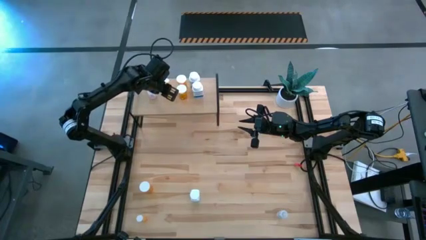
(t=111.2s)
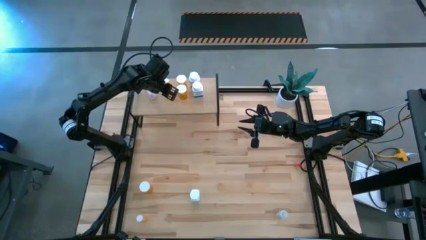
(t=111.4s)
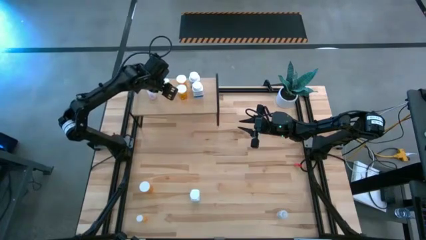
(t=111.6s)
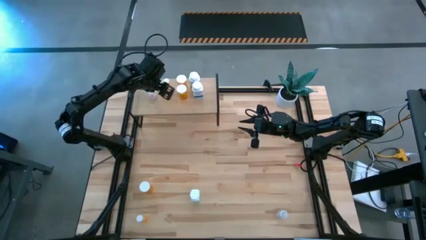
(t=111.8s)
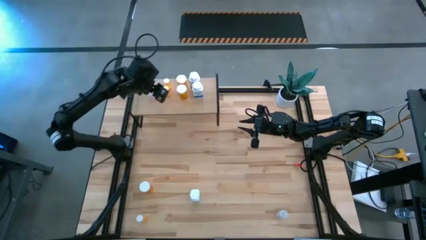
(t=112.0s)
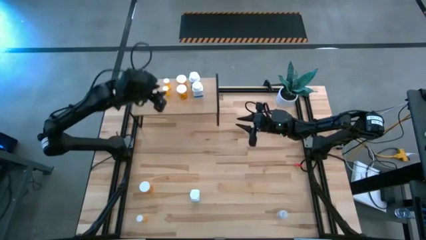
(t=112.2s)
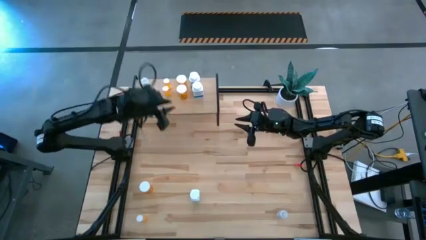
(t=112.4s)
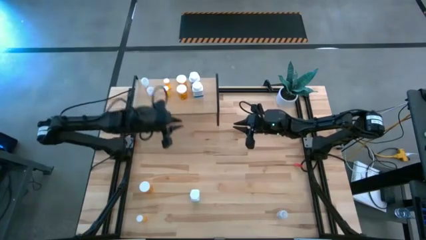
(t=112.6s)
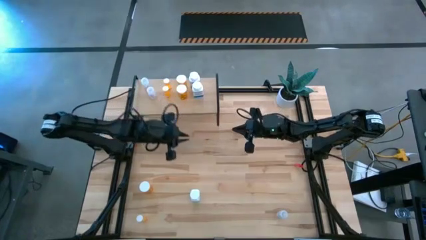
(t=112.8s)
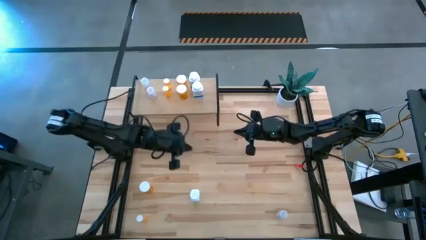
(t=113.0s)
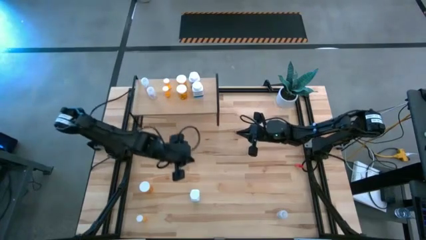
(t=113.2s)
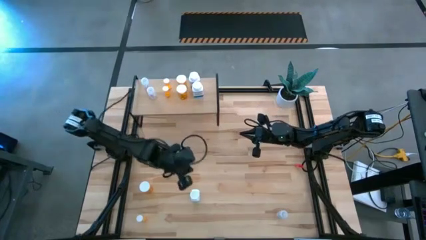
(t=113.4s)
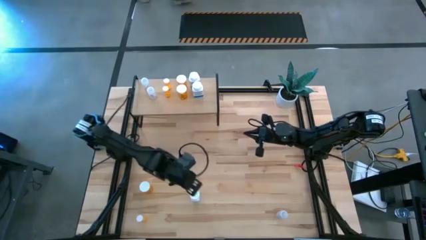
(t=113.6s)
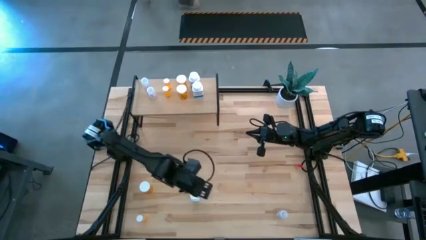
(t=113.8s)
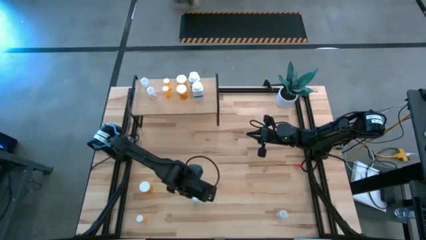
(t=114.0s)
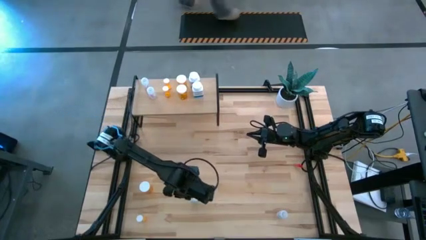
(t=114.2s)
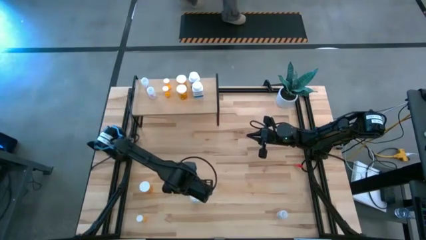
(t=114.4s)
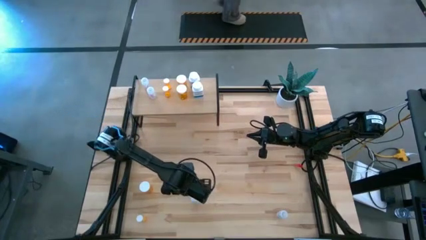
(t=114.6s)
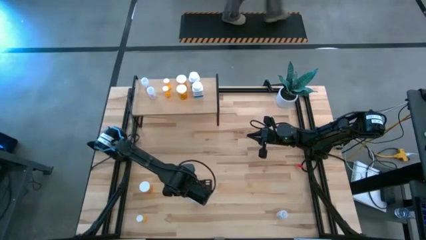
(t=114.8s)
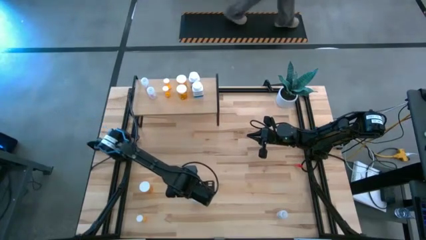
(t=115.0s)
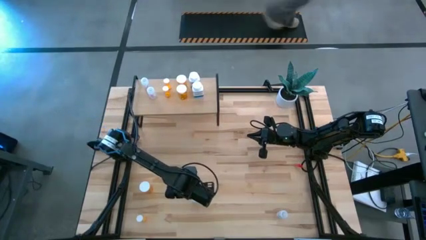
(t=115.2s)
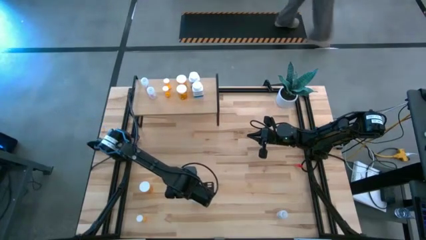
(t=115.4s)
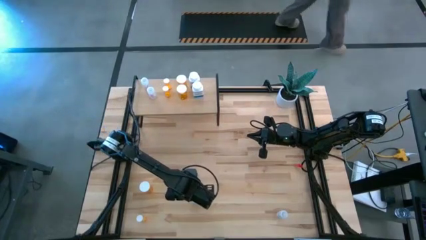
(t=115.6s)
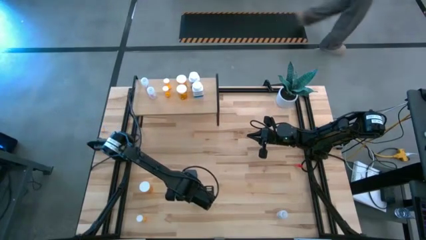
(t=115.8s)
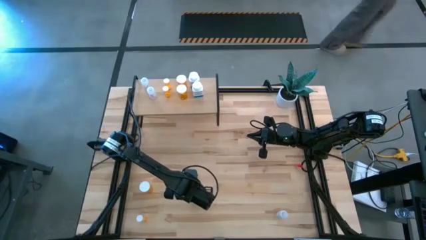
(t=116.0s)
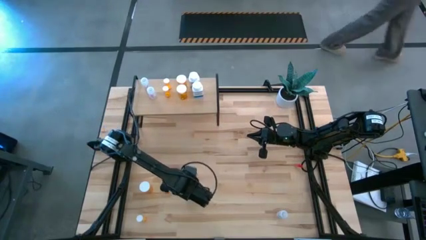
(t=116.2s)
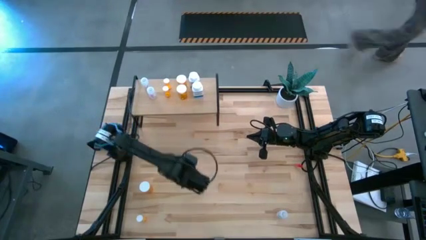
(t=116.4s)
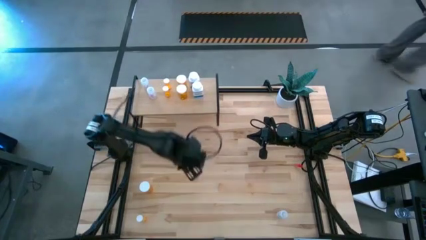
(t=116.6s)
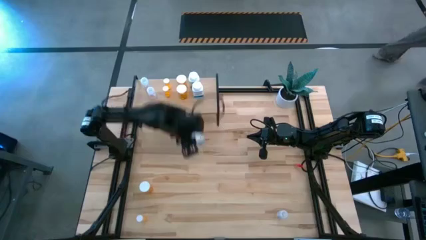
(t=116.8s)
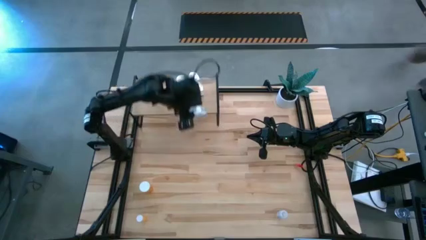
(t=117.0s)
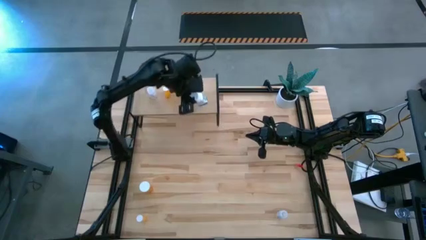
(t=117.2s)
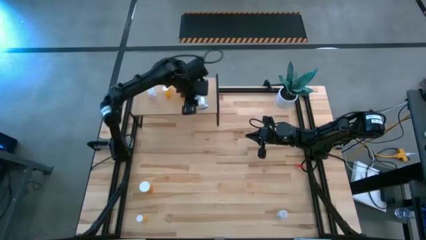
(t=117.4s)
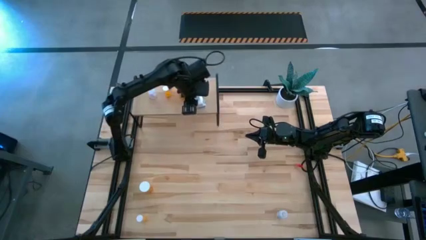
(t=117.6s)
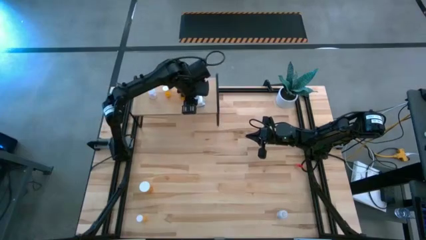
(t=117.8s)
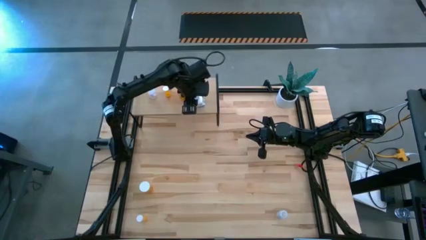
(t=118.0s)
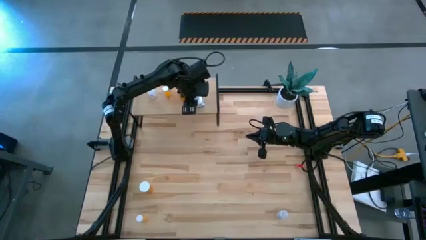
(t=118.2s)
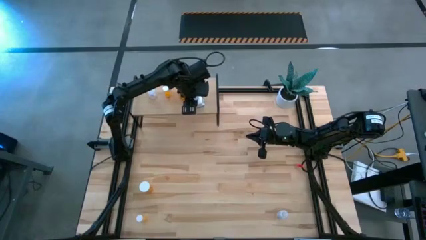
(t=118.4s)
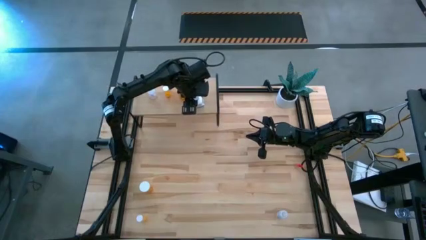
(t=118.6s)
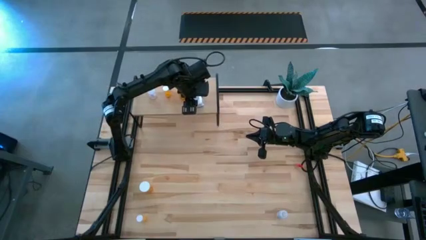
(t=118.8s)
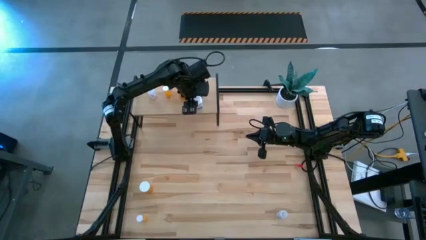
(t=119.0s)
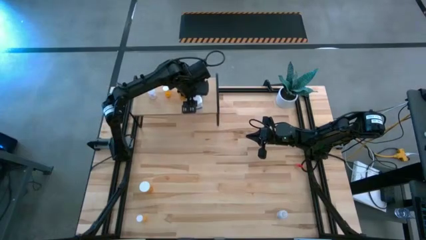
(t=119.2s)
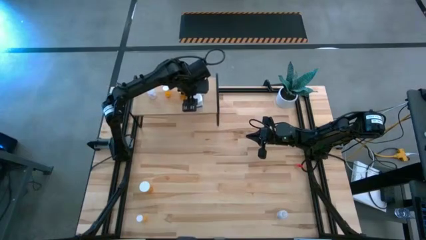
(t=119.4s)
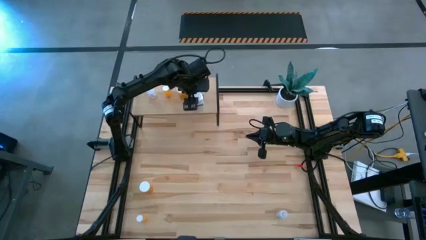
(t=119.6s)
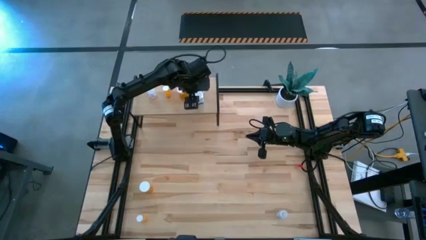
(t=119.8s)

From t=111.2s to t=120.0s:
Task: Pick and place medicine bottles onto shelf by color
Put the white pill bottle aligned with the other white pill bottles on the shelf

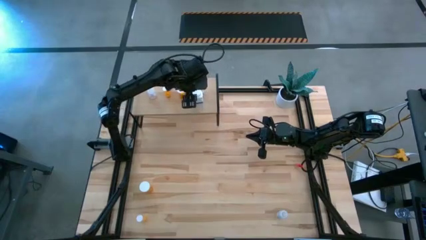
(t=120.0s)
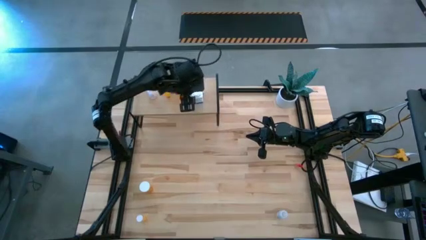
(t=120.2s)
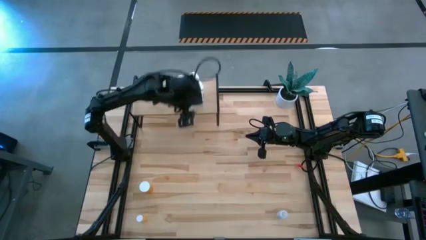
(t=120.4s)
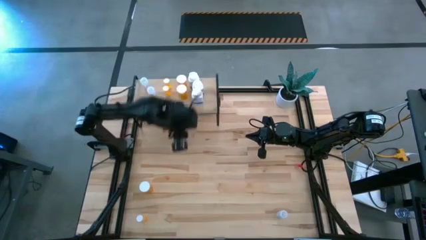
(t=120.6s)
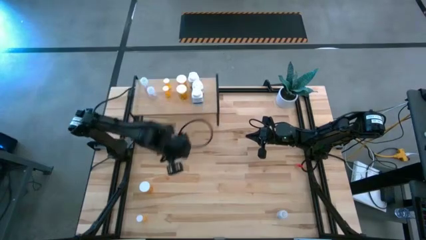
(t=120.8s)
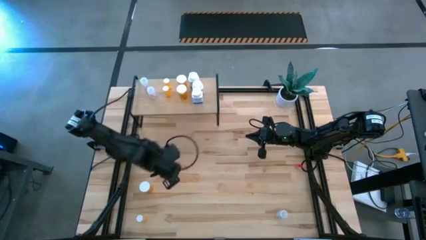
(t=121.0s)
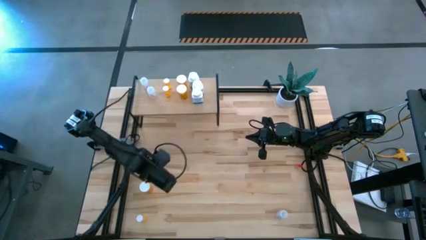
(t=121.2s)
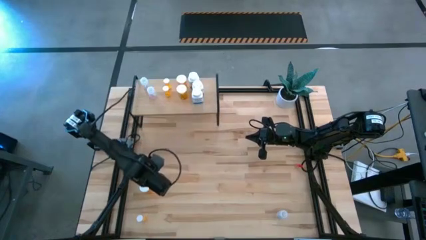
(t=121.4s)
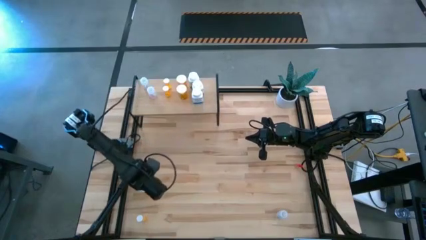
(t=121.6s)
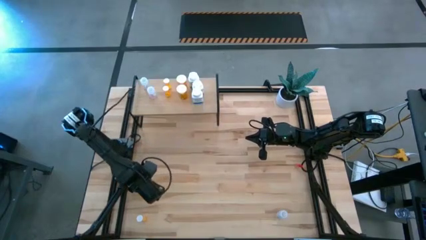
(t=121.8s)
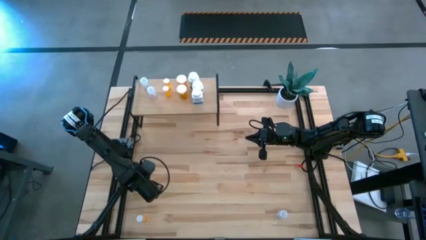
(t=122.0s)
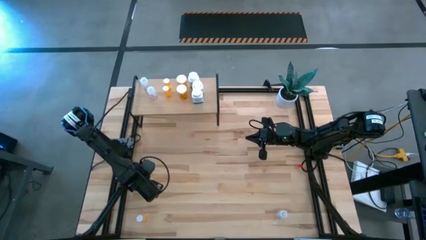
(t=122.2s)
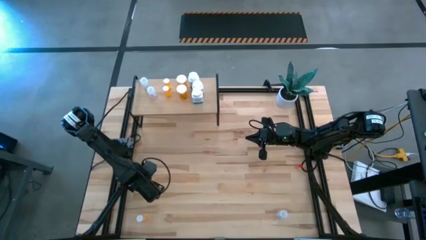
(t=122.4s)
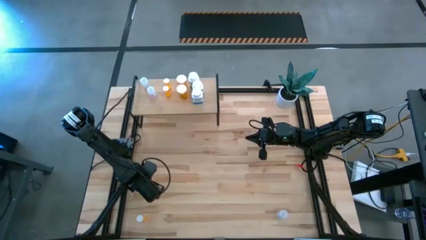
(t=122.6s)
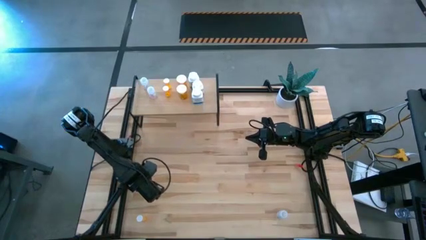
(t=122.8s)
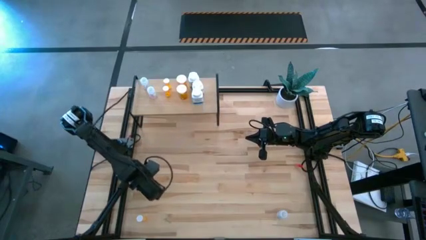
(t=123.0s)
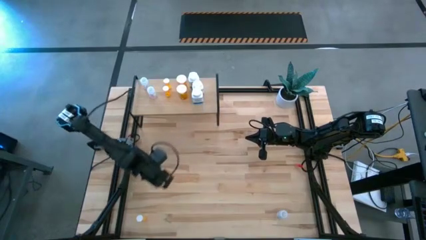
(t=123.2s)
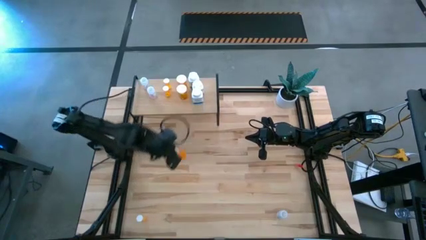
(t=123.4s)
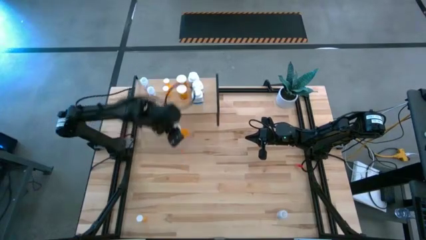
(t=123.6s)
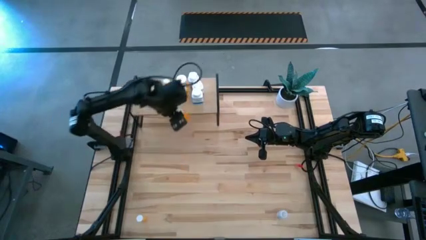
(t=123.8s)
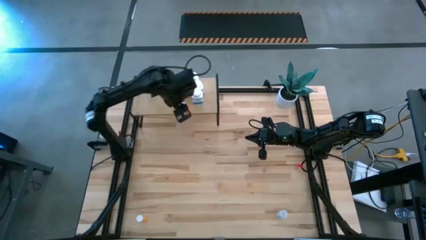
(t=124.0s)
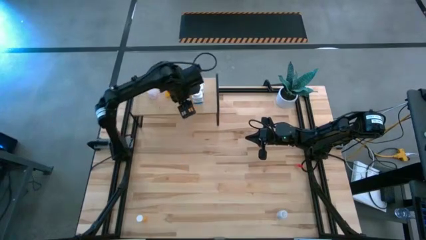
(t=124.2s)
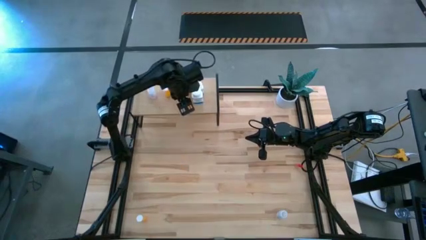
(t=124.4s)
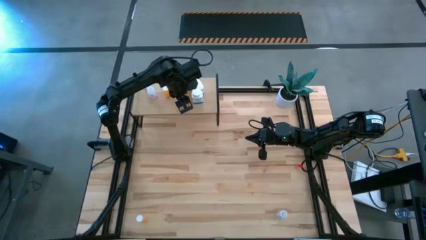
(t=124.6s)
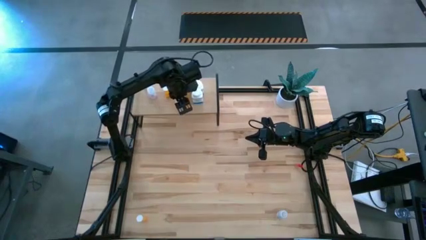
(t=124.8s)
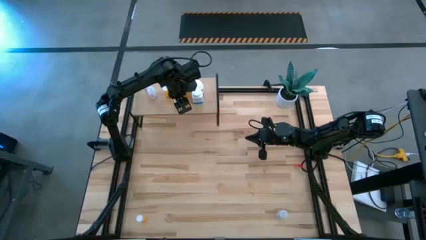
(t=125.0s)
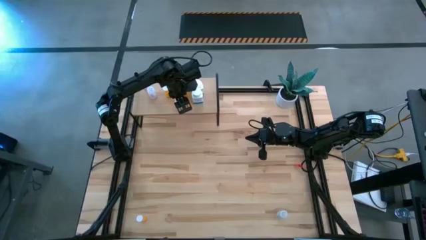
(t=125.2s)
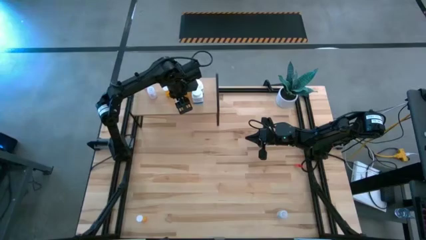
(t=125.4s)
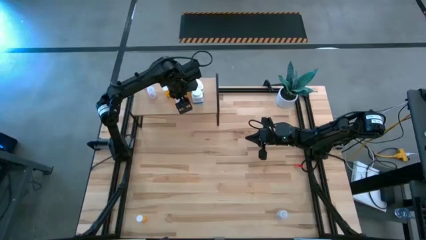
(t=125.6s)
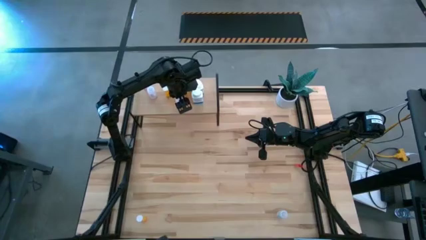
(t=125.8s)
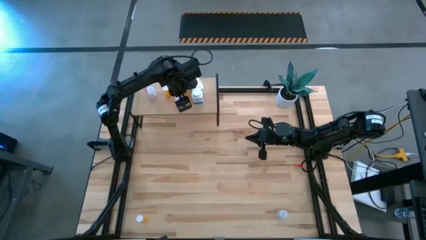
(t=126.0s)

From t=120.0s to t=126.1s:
Put the large orange pill bottle aligned with the other large orange pill bottles on the shelf
